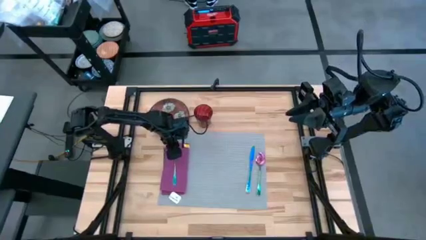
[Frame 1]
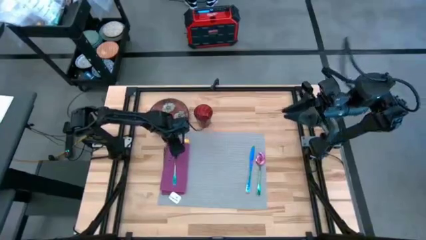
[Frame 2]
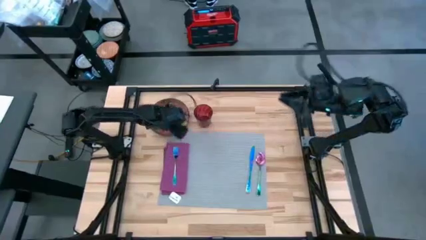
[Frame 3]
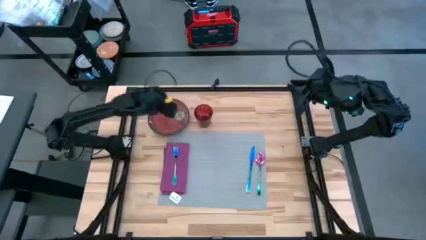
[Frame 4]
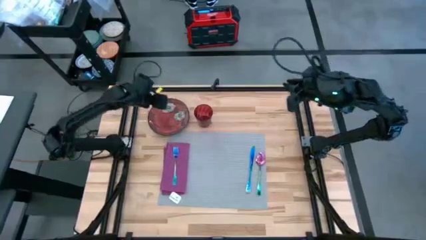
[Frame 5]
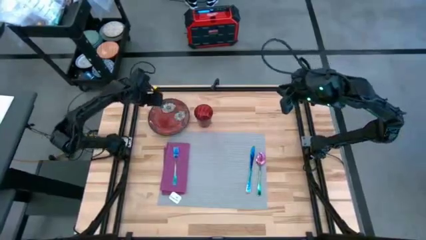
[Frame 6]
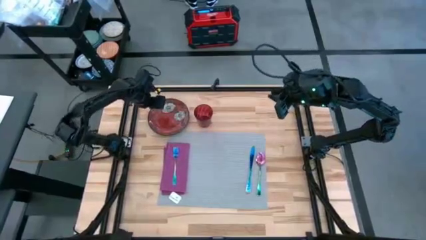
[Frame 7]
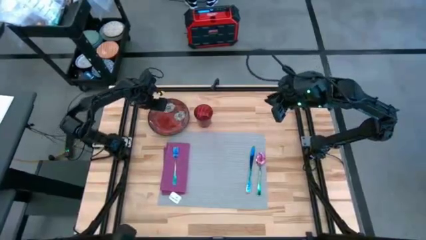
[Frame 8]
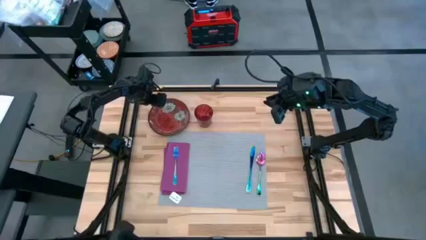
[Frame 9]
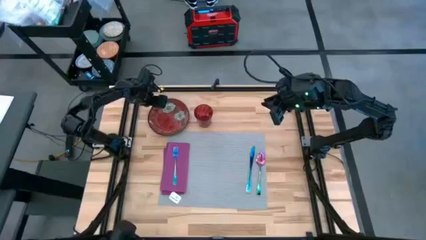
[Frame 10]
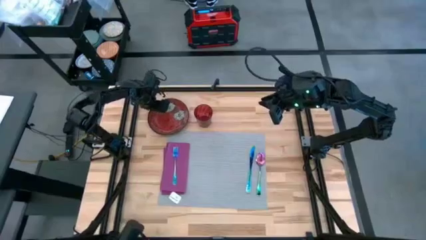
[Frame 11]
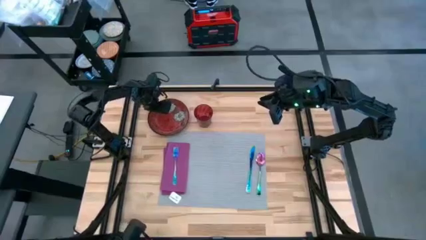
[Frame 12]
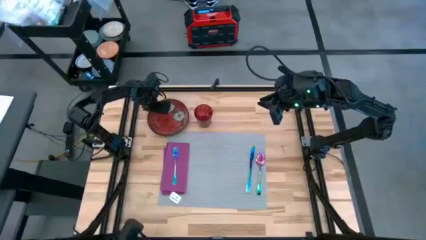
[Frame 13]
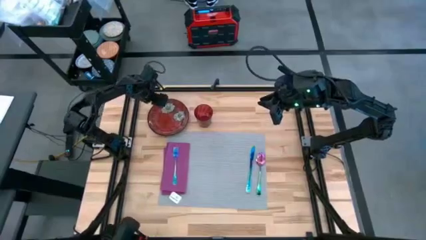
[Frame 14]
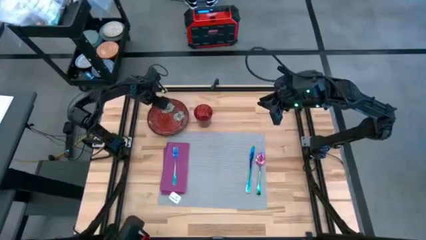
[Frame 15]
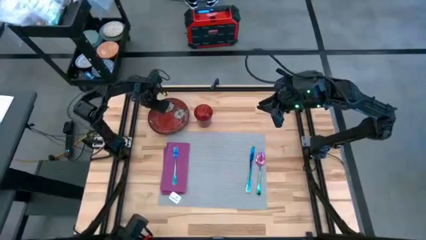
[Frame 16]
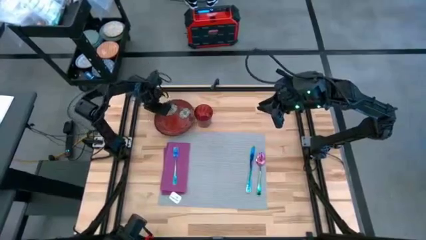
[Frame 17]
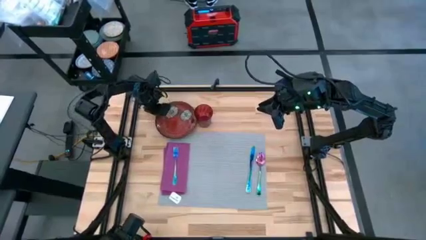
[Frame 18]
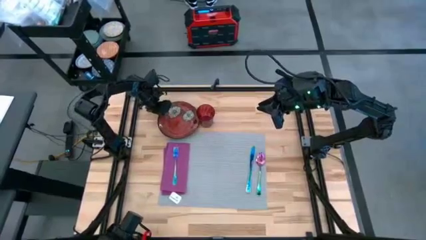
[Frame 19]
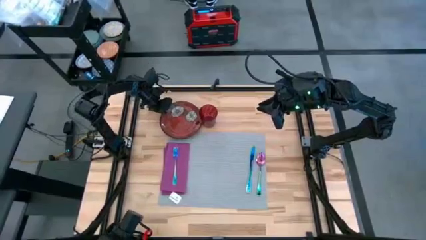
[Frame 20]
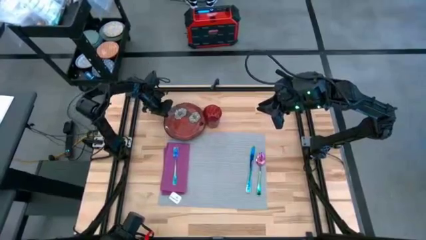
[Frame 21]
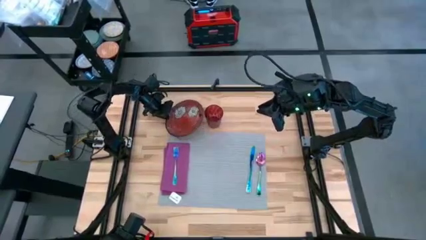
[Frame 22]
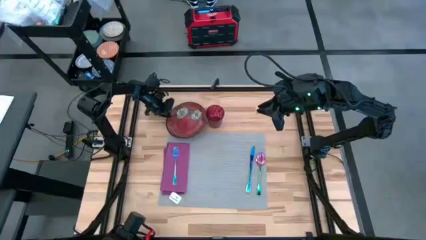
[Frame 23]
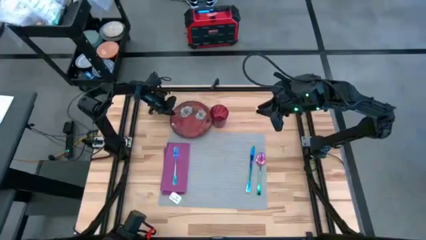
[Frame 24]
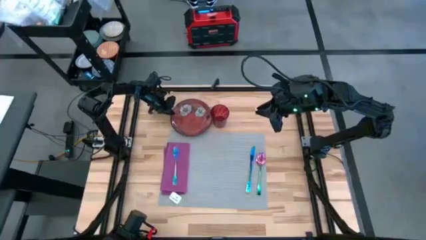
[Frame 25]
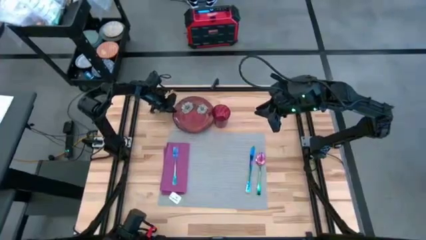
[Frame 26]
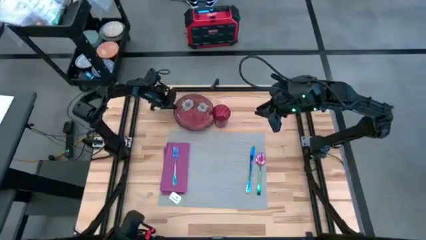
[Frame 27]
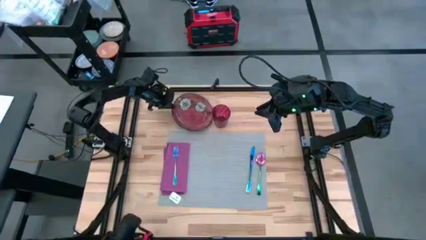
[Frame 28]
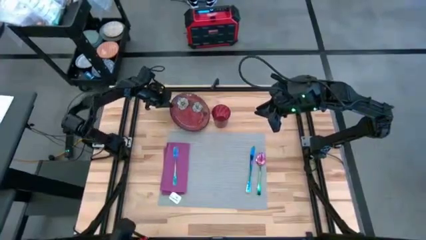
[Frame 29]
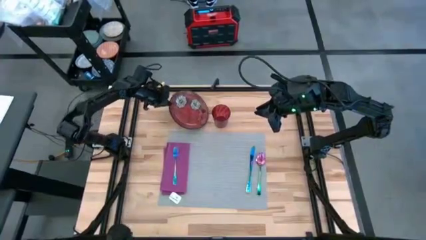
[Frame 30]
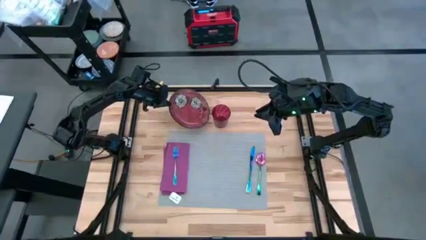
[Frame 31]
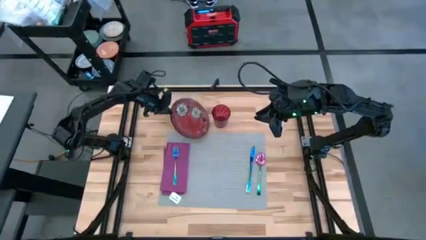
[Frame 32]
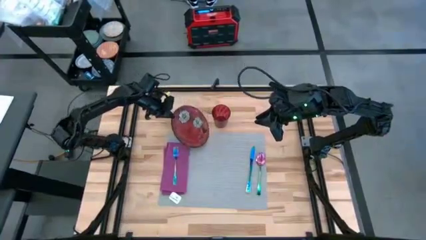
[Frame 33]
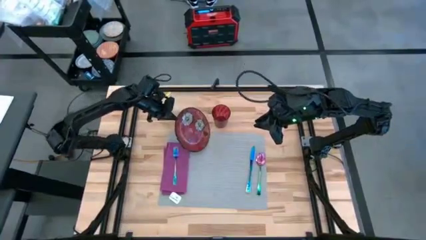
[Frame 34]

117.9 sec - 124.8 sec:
Task: Set table place
Put the red plate on the center of the gray place mat

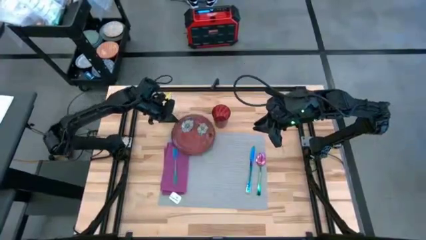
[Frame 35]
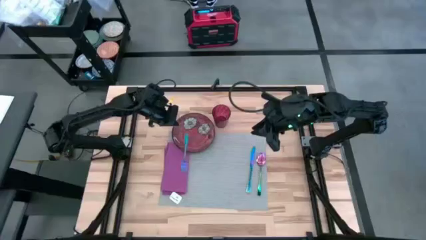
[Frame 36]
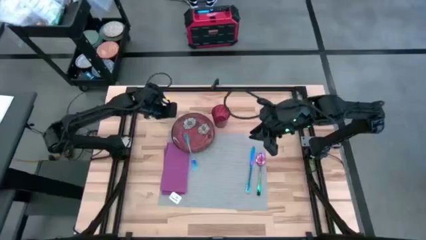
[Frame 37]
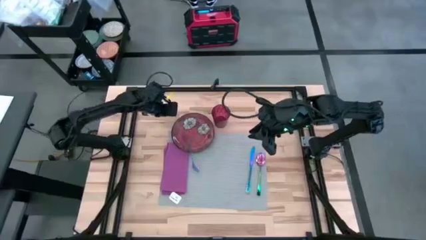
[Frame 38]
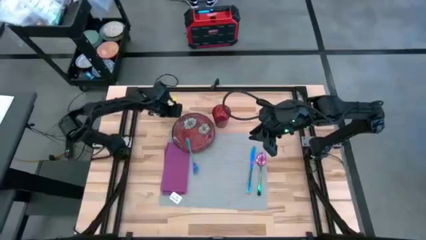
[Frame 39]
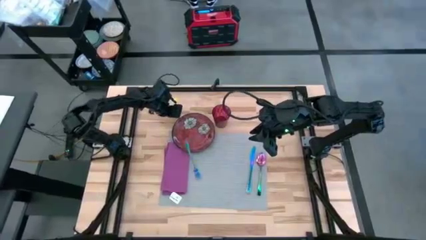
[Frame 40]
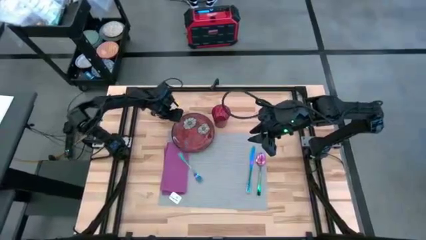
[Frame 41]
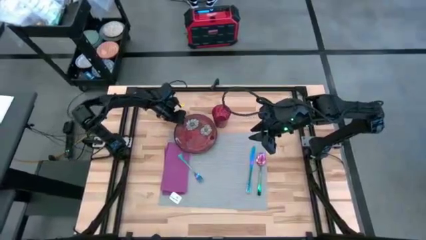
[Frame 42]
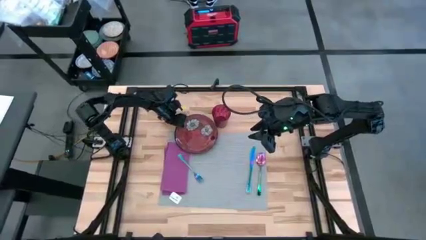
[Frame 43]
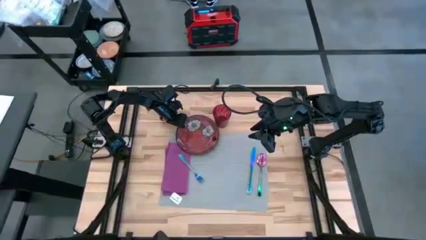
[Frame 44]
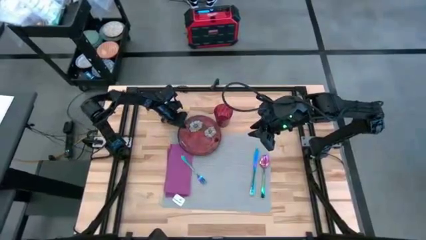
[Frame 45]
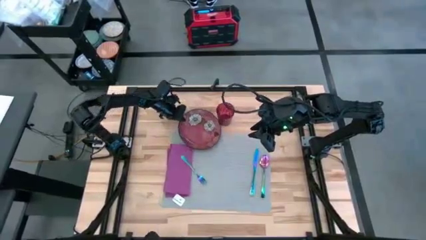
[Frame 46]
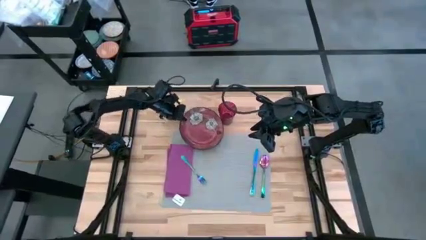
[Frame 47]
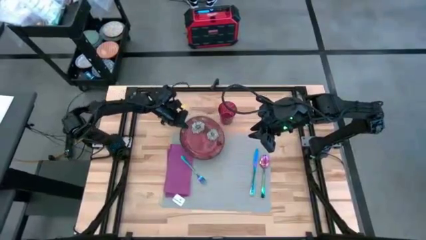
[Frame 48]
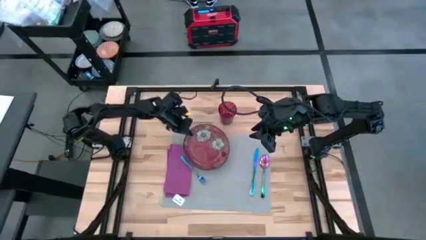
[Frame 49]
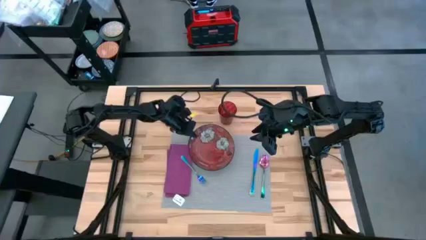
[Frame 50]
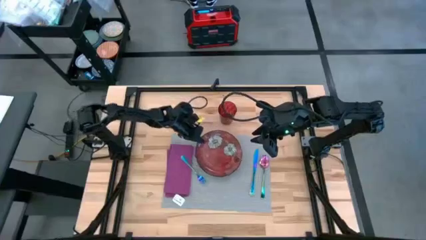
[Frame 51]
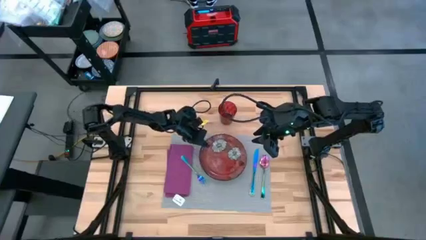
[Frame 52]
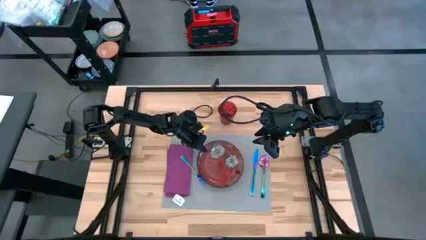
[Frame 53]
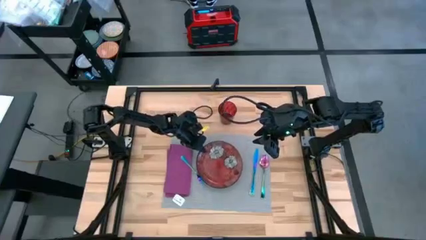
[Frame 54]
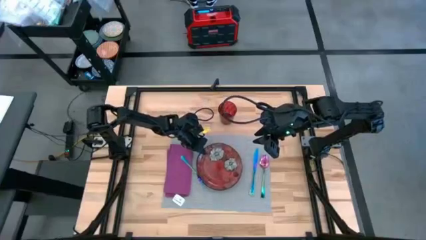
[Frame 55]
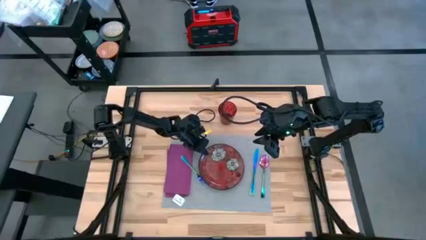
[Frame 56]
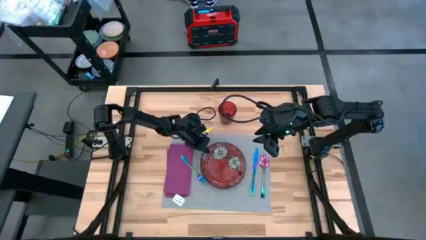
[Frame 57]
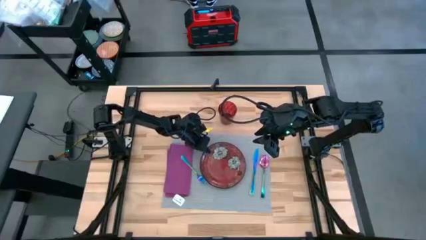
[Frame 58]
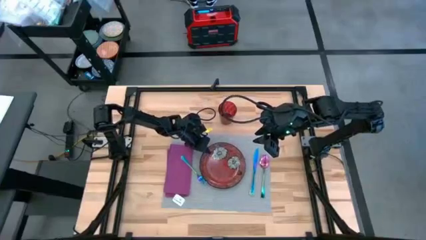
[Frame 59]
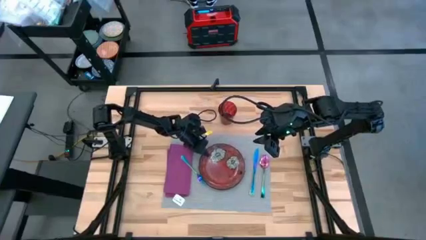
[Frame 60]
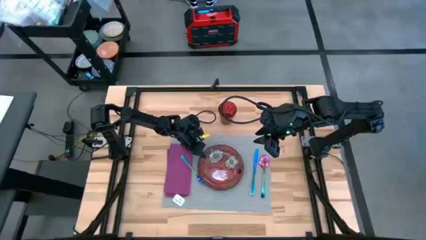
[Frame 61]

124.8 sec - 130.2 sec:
Put the red plate on the center of the gray place mat
